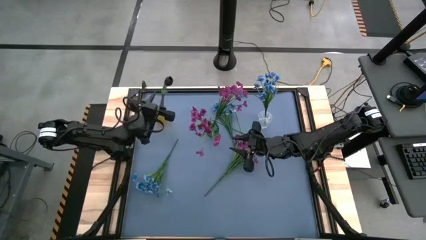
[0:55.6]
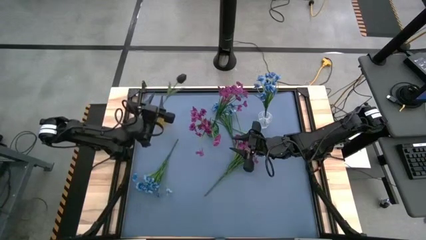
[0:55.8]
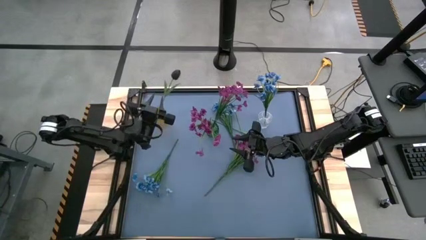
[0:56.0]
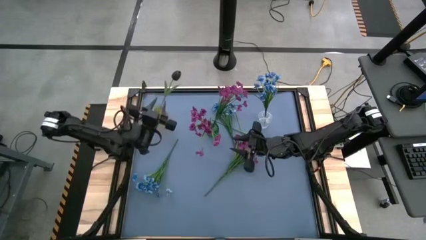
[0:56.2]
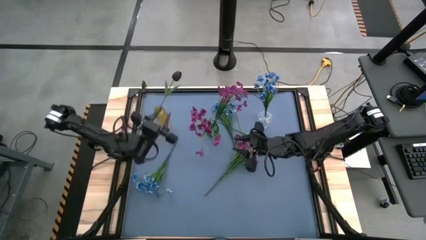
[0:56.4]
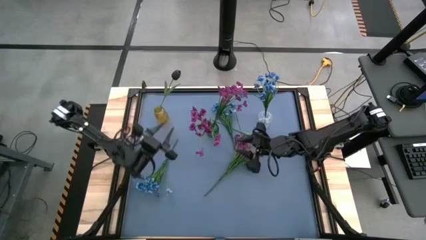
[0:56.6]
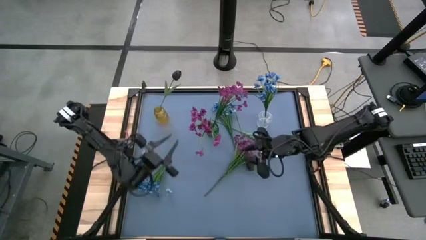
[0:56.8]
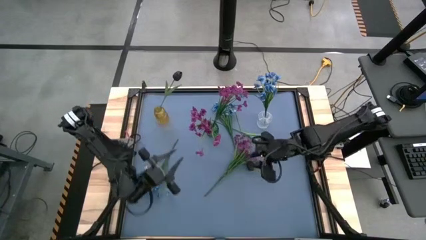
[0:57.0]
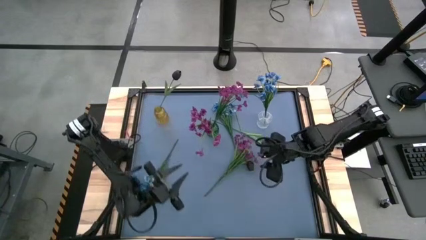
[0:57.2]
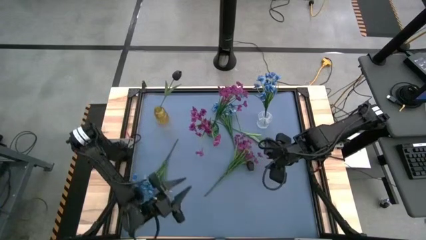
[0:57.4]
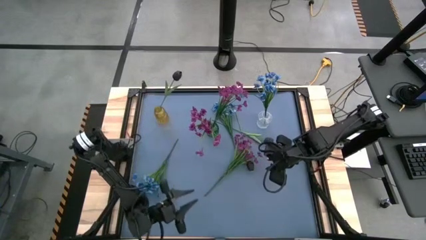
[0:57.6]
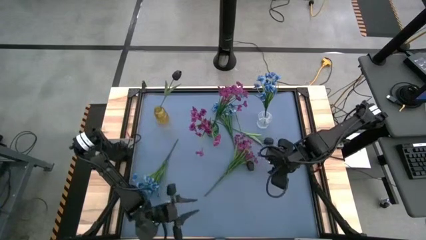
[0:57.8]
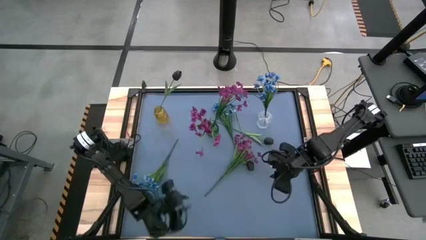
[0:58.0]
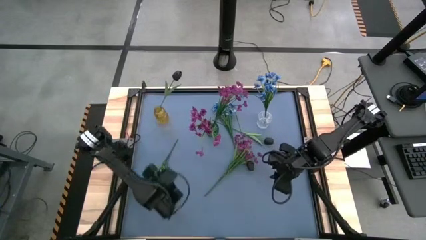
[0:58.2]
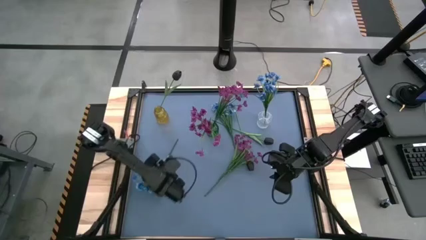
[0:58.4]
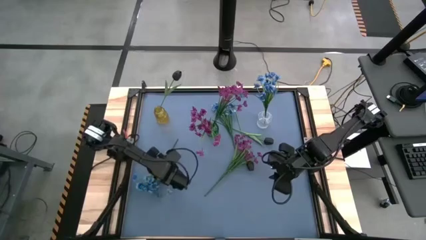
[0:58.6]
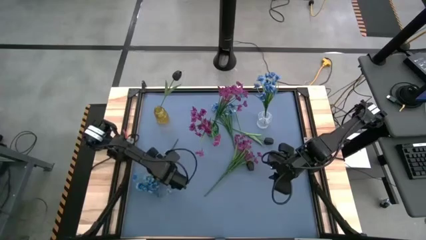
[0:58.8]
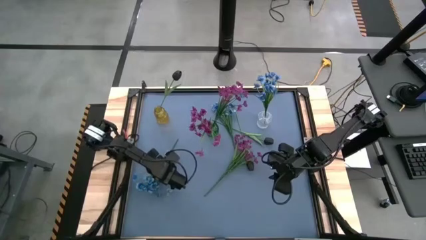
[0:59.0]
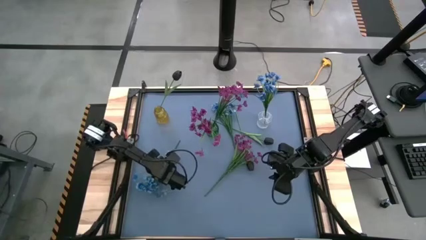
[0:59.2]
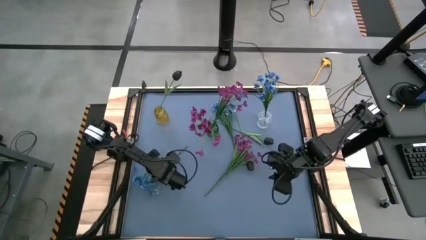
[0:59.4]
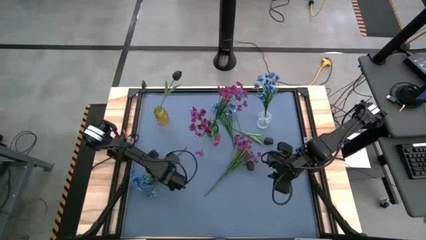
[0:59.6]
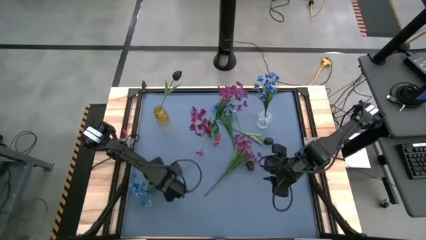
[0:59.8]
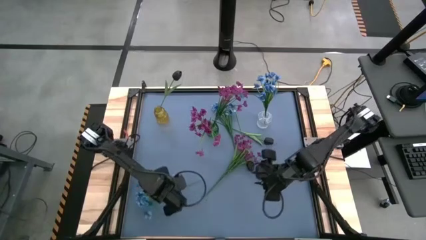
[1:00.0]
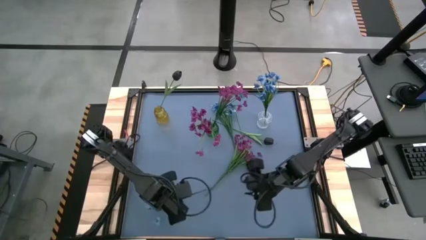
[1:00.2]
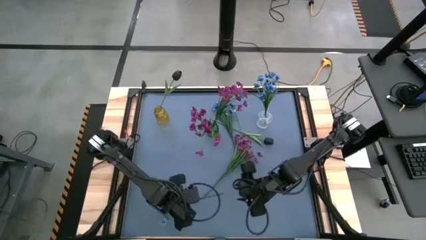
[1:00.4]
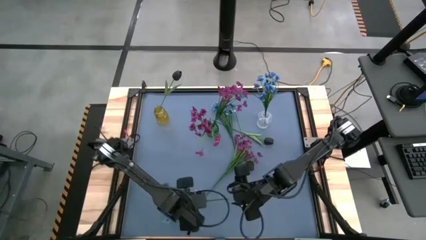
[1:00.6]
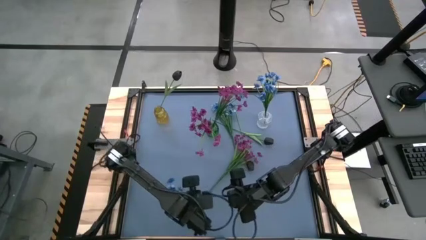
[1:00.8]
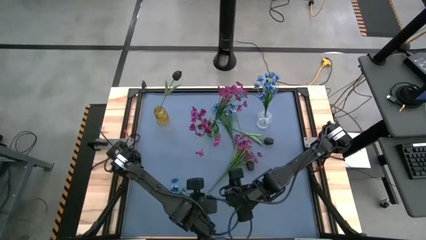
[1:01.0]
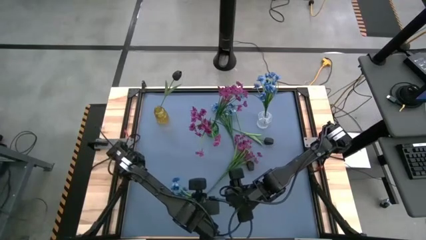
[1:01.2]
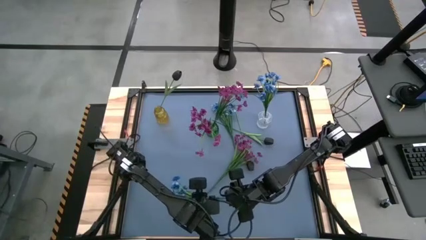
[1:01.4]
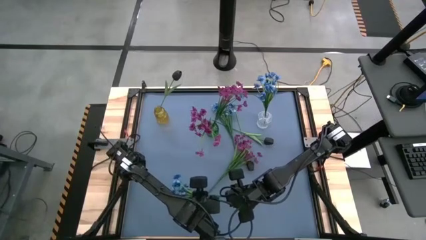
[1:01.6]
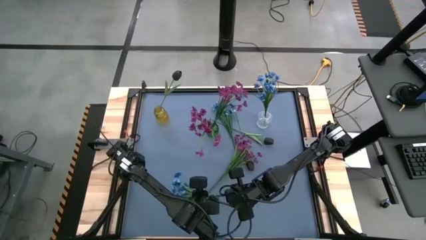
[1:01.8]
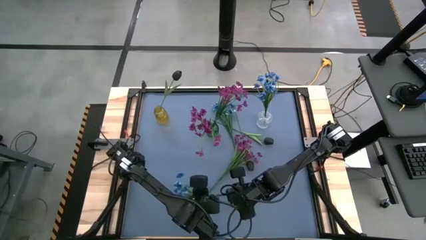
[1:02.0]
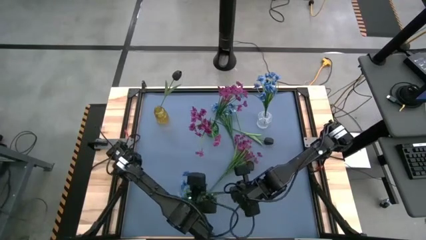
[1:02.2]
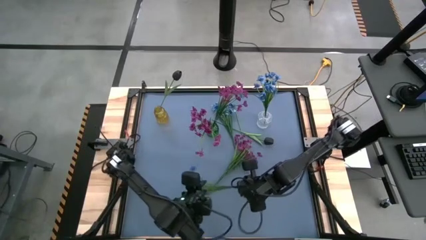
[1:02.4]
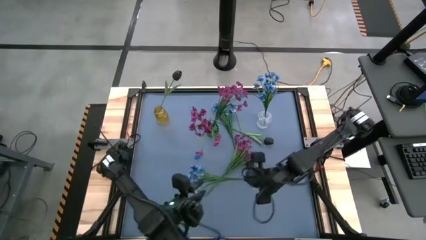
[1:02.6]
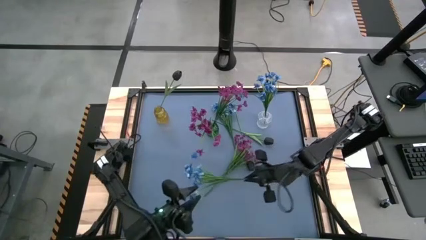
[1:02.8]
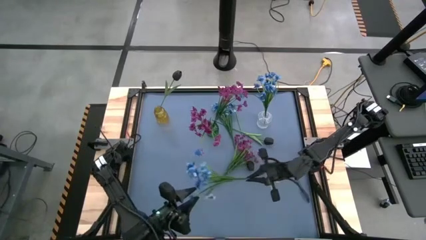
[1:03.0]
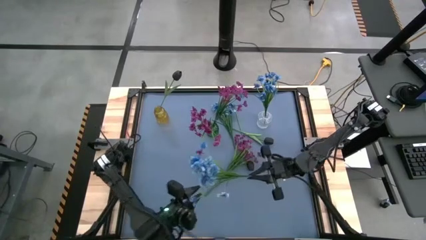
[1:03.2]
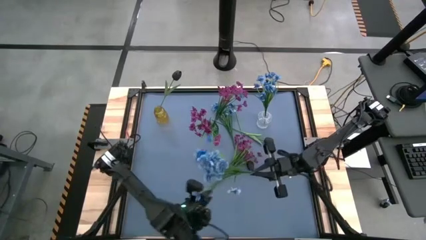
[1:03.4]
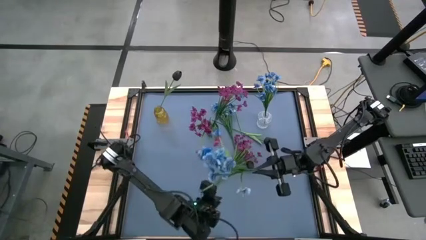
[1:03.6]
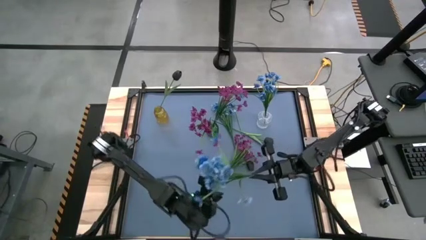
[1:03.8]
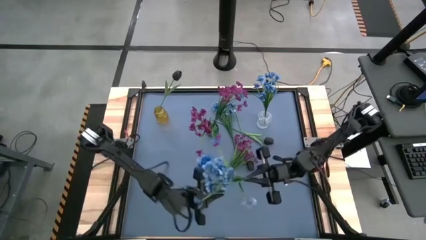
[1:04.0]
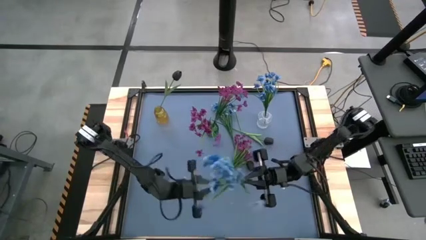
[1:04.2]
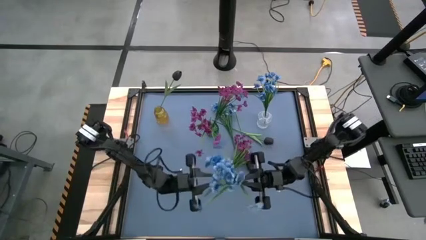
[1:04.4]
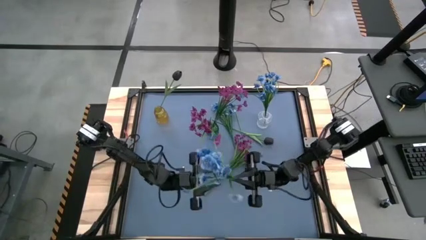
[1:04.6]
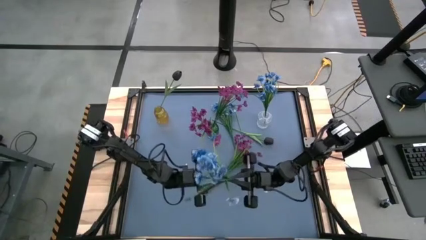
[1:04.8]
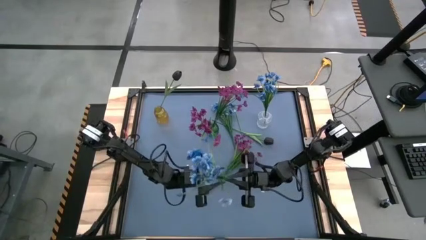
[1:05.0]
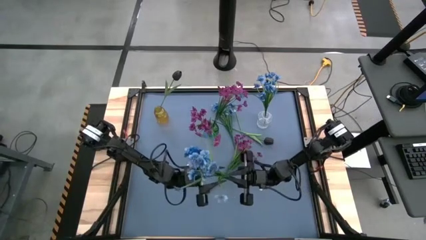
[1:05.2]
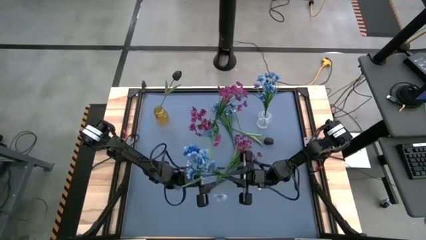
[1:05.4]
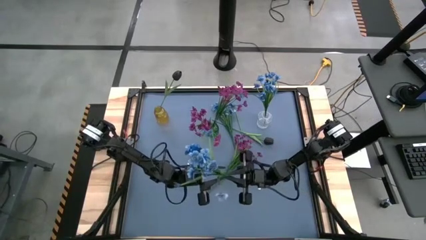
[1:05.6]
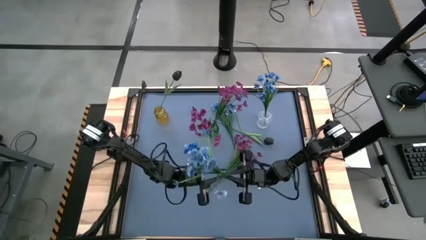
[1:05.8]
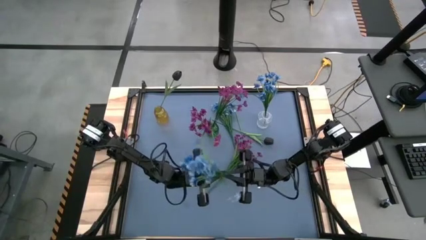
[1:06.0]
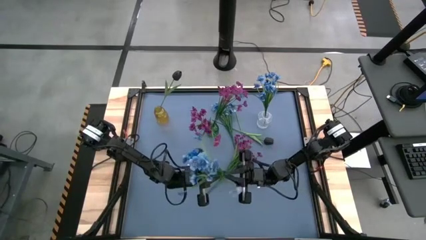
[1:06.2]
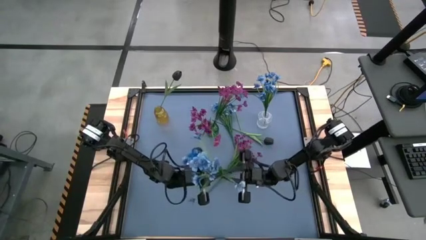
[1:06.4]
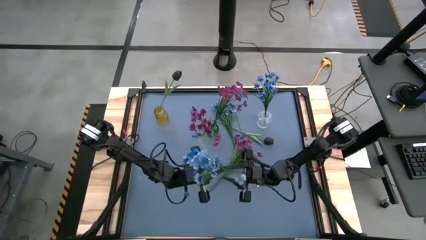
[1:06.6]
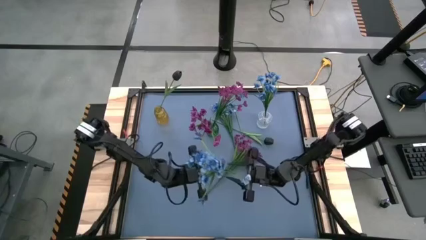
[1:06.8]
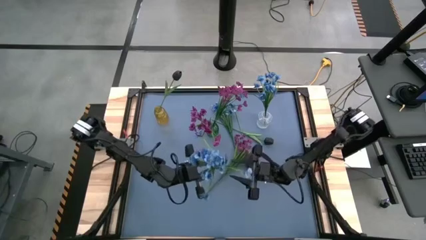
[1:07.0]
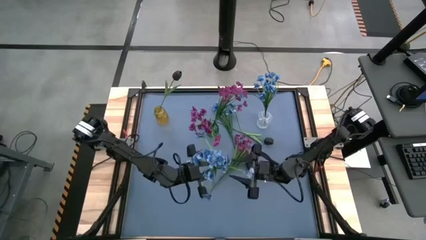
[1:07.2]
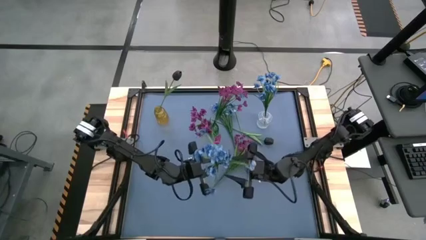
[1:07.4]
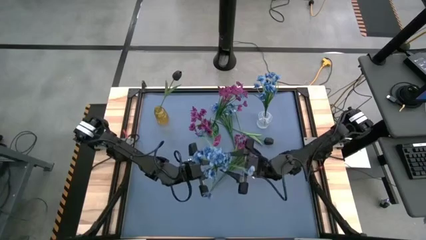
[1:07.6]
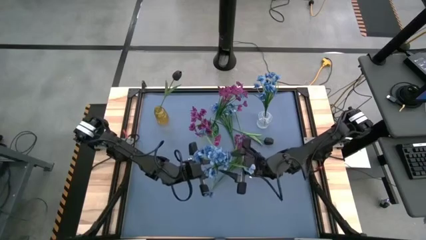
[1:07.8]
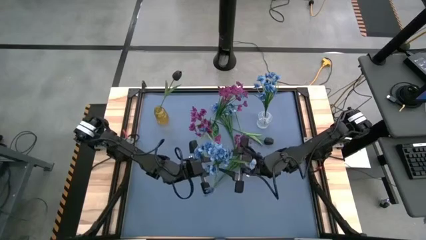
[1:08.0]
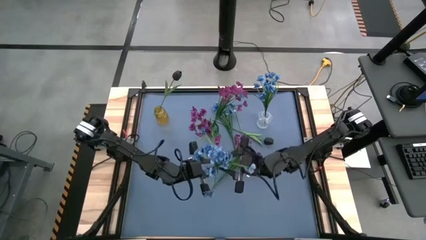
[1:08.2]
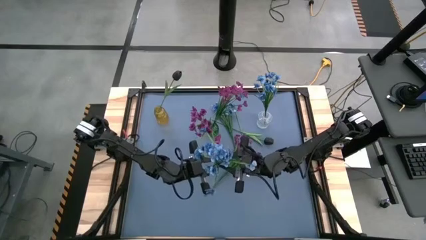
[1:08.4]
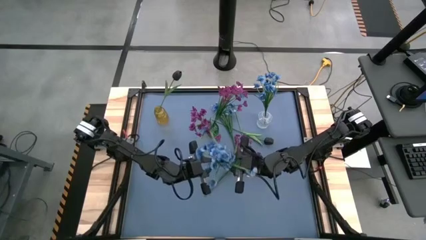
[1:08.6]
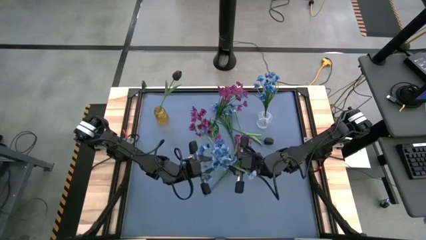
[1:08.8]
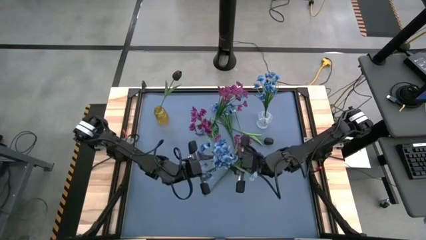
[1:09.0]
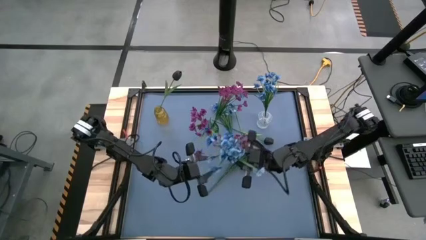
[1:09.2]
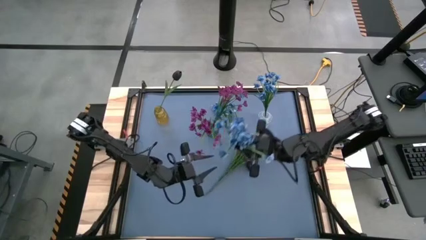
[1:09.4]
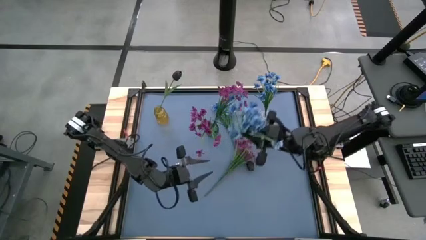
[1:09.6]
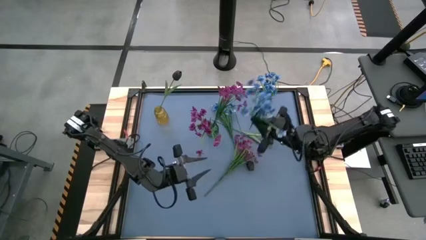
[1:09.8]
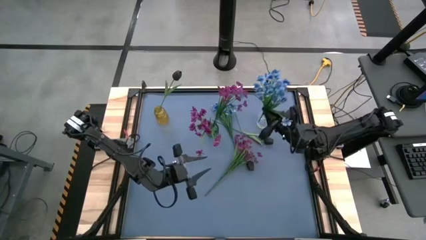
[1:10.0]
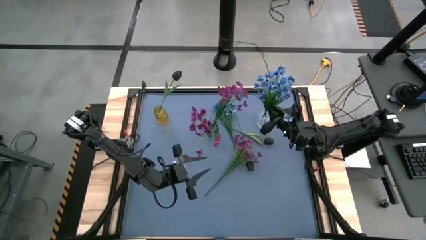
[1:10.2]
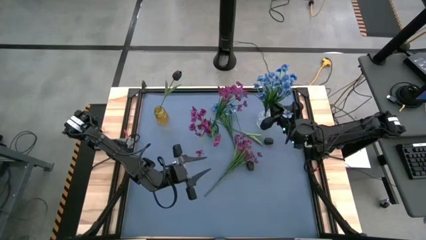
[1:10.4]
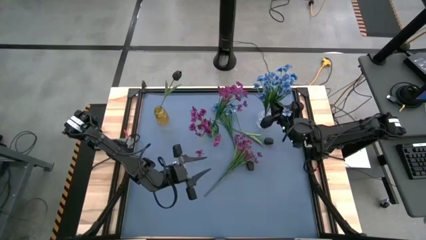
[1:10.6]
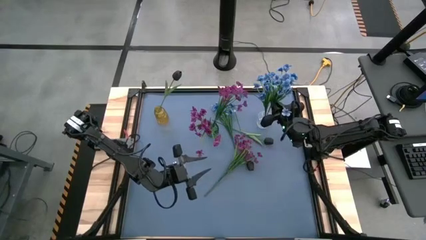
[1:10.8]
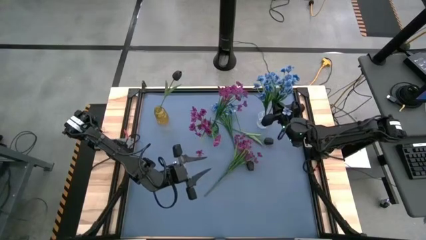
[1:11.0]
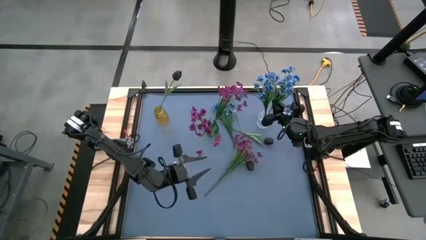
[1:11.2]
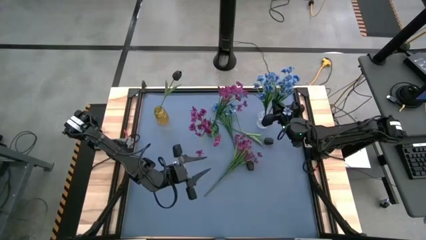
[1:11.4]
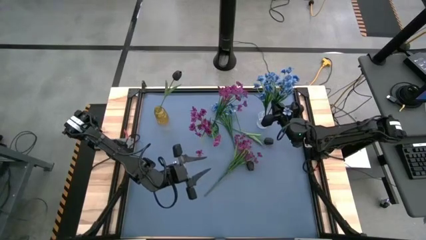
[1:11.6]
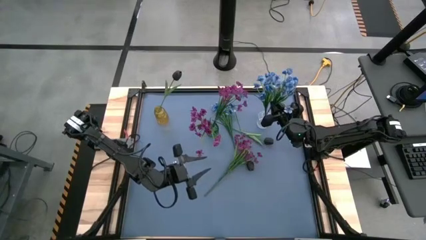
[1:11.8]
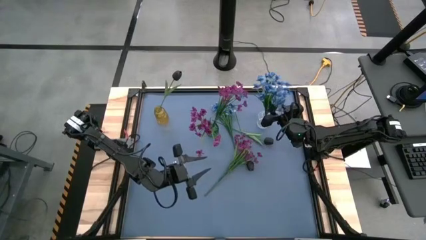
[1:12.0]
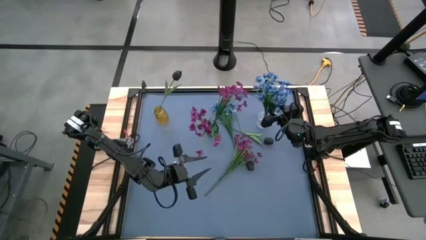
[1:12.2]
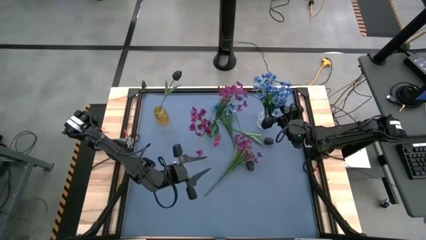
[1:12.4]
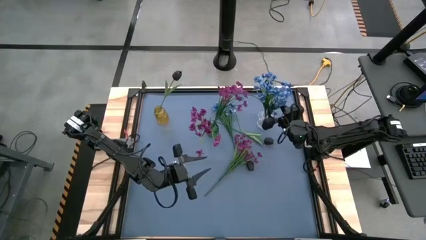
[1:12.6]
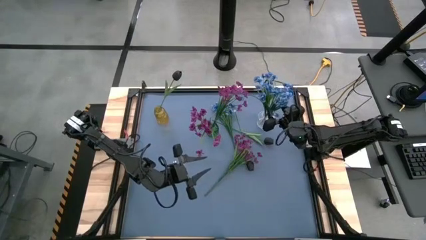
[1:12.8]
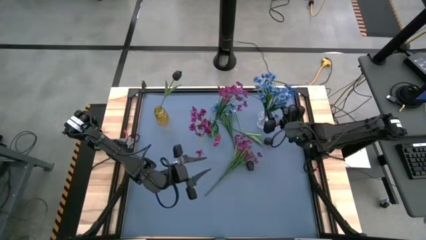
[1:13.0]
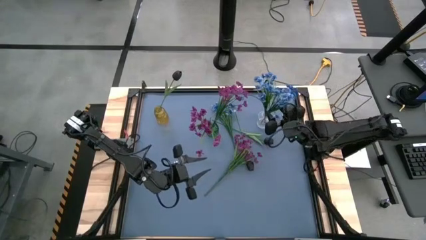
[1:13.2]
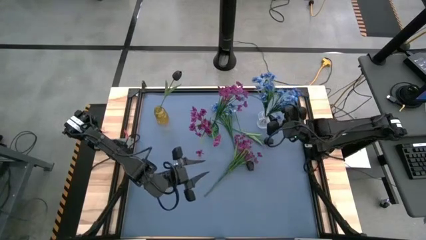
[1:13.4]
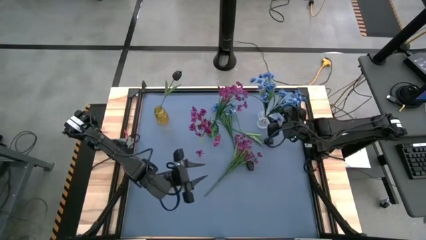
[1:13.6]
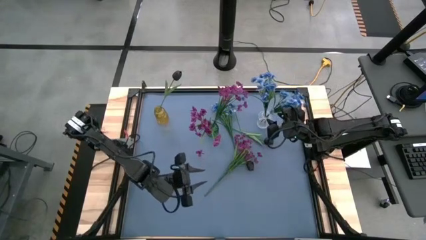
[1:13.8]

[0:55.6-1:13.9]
Task: Sort flowers into vase by color
Put the bottom blue flowers into the transparent vase
